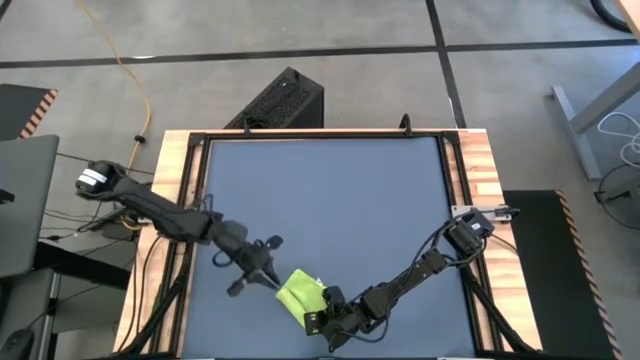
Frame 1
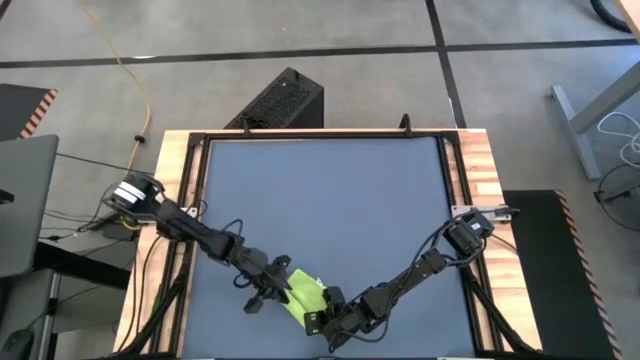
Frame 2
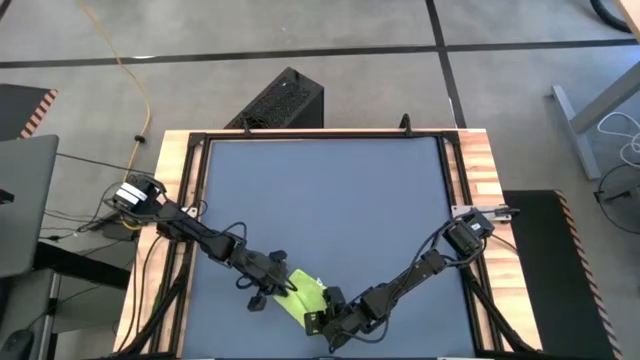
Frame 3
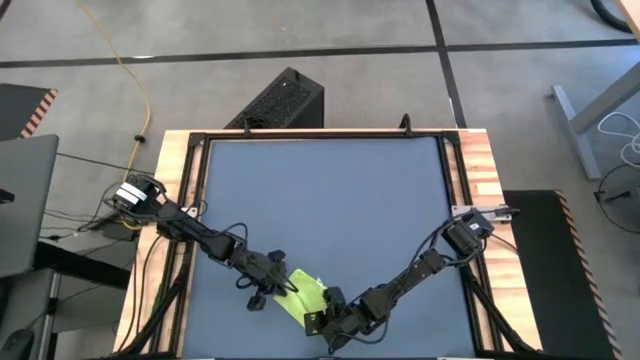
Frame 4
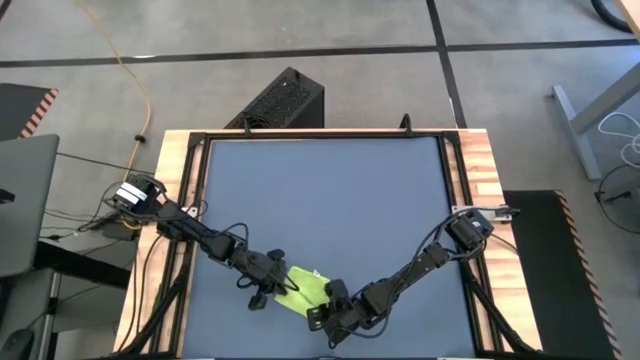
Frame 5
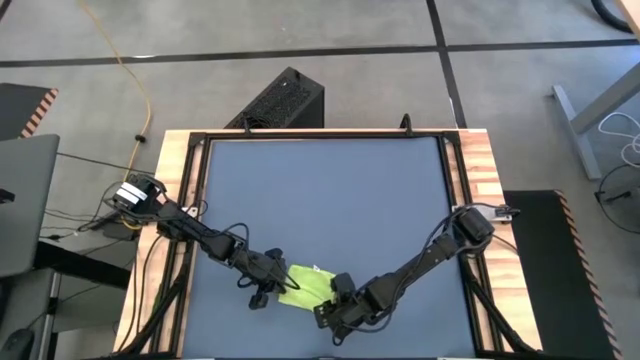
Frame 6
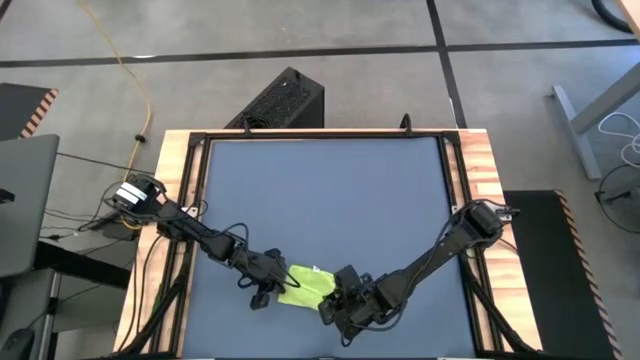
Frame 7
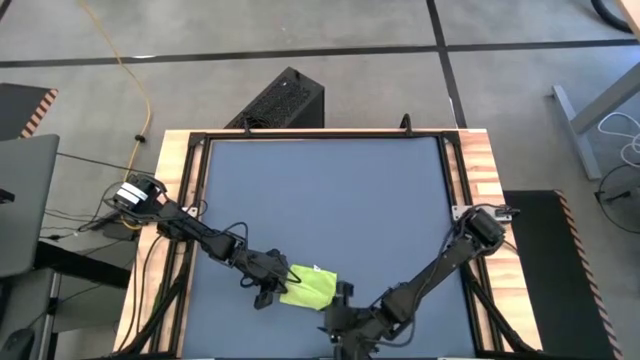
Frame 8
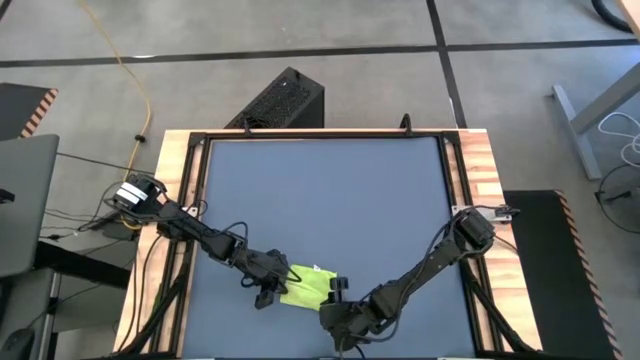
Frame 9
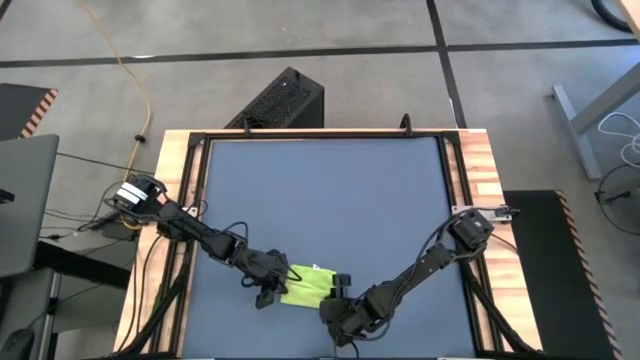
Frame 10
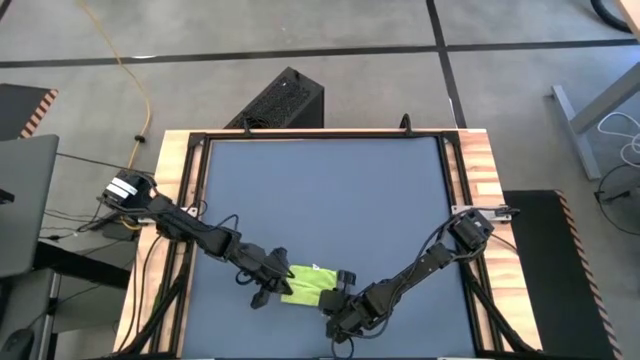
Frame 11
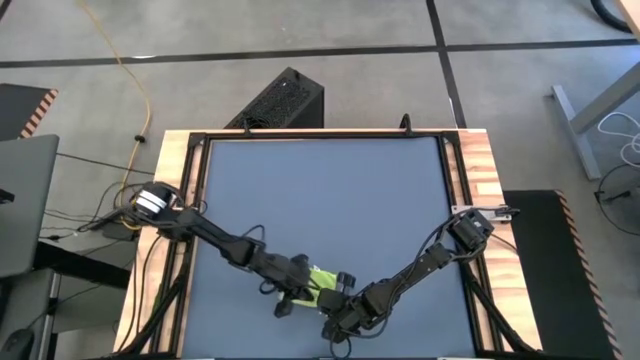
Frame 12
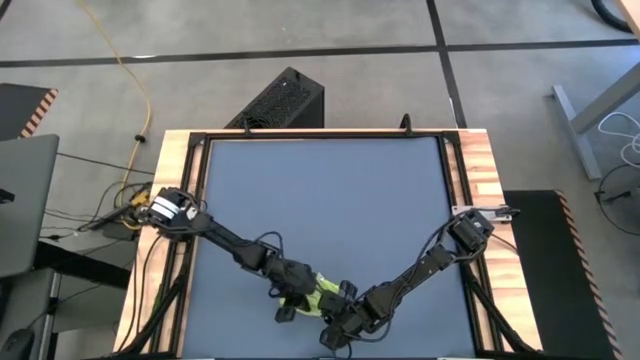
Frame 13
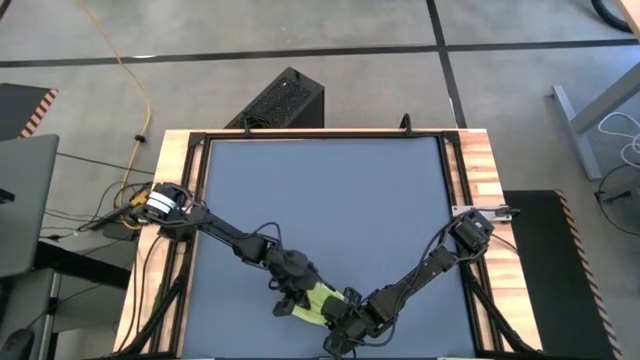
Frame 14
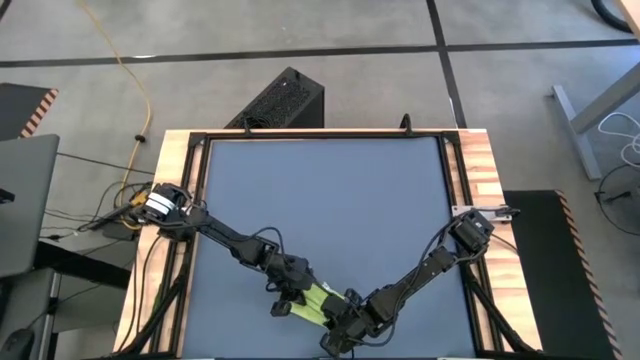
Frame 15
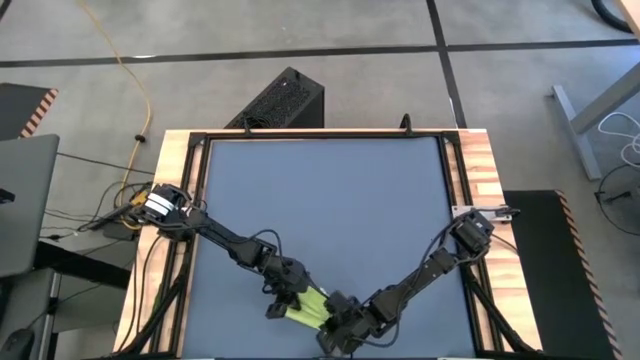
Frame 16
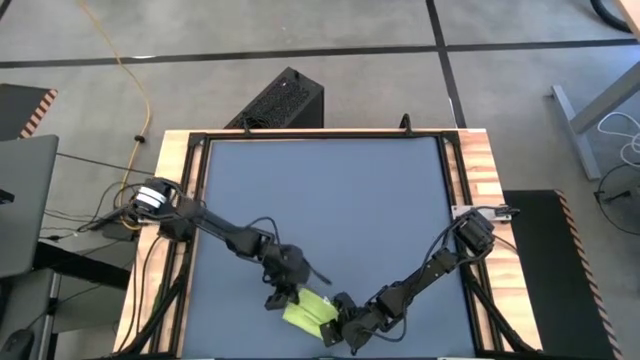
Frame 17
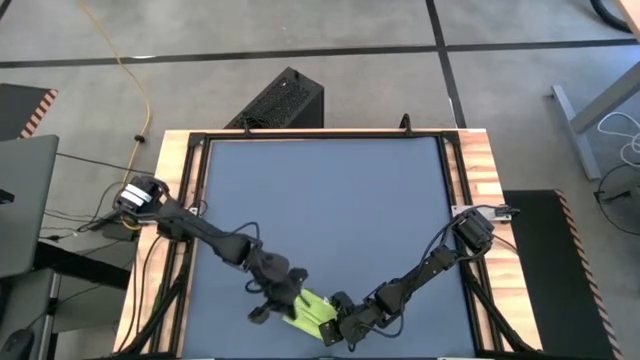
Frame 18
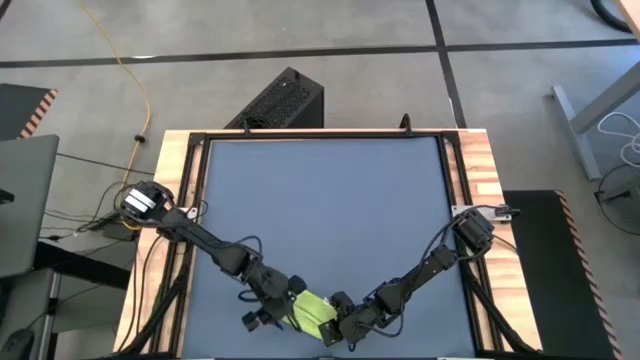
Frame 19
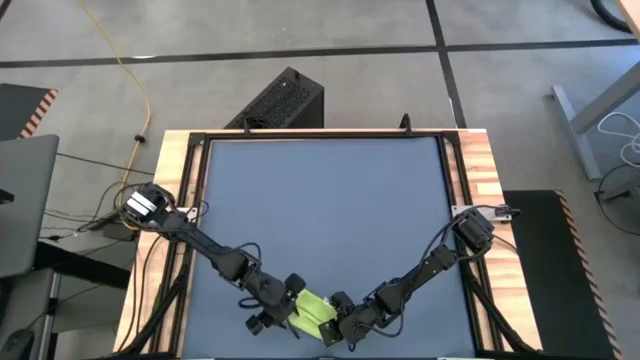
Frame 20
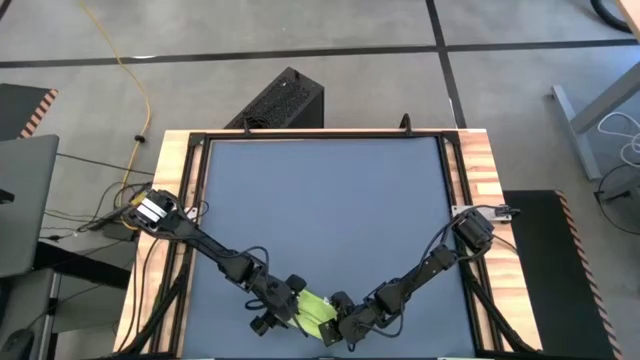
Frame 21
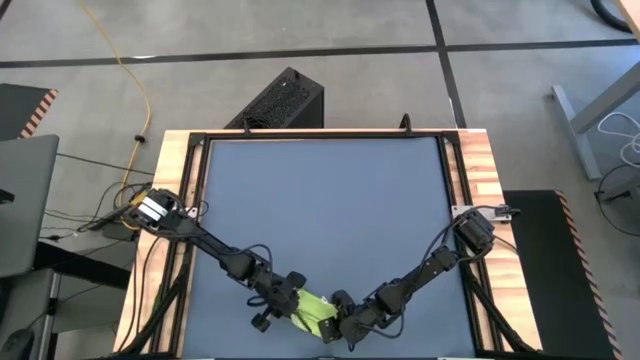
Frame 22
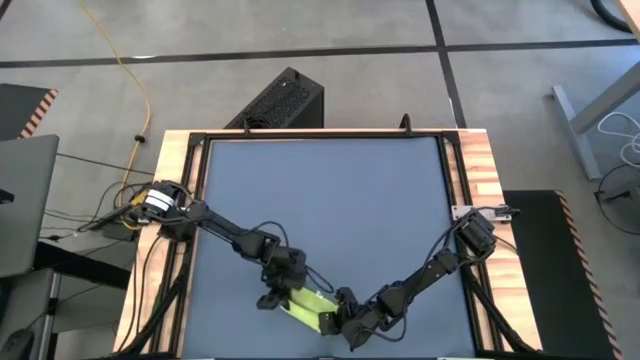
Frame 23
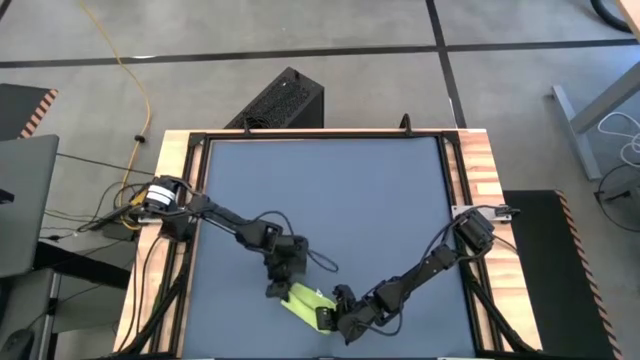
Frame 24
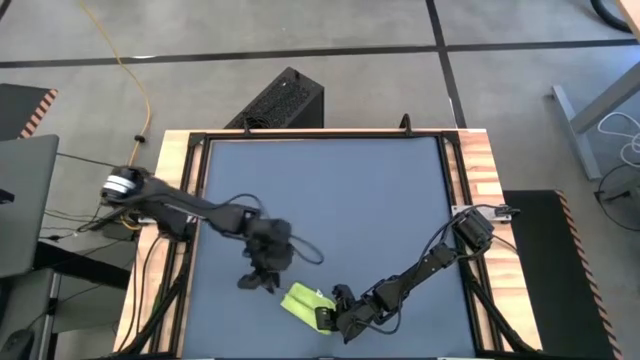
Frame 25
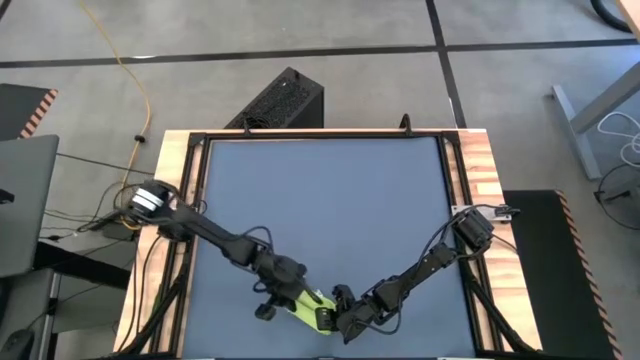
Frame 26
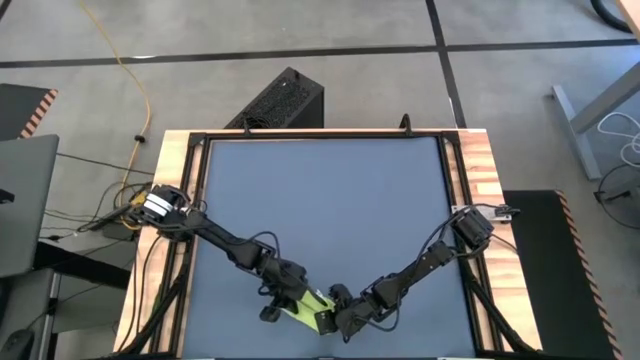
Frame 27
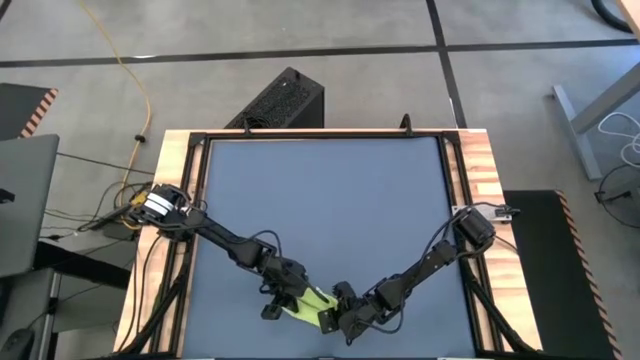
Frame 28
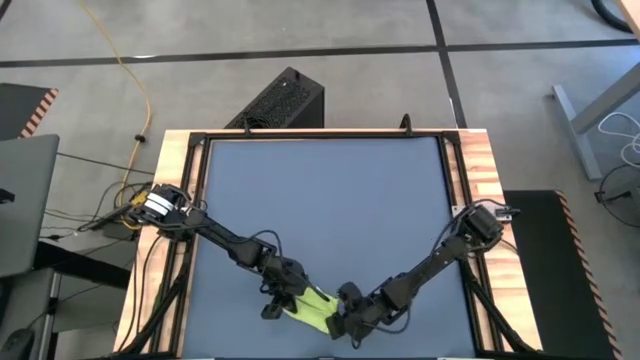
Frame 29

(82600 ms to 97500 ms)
Task: Roll towel
Roll the green towel

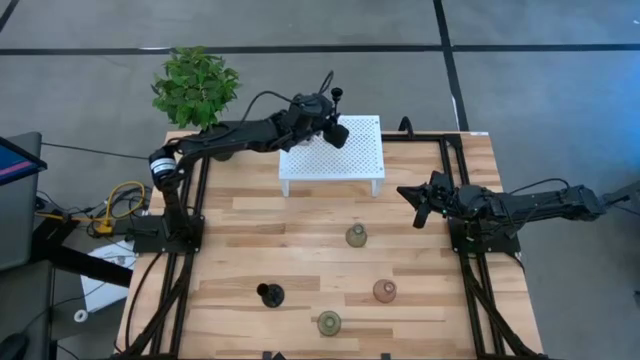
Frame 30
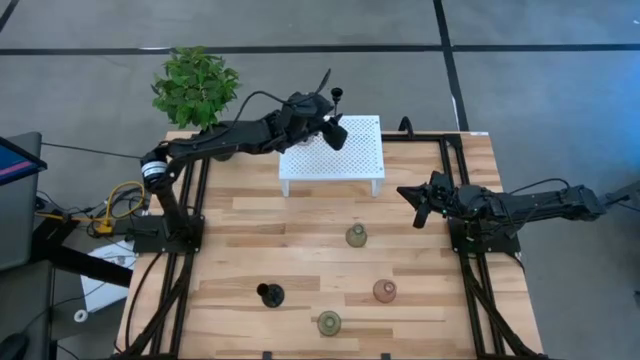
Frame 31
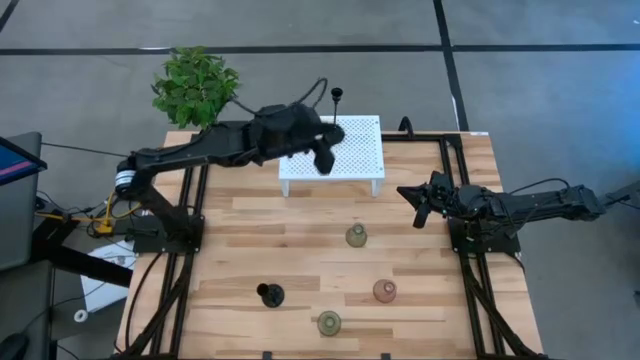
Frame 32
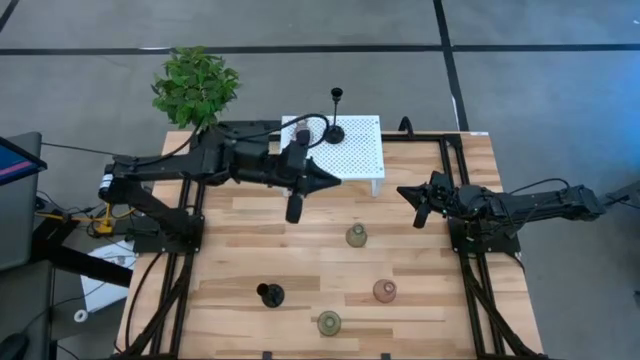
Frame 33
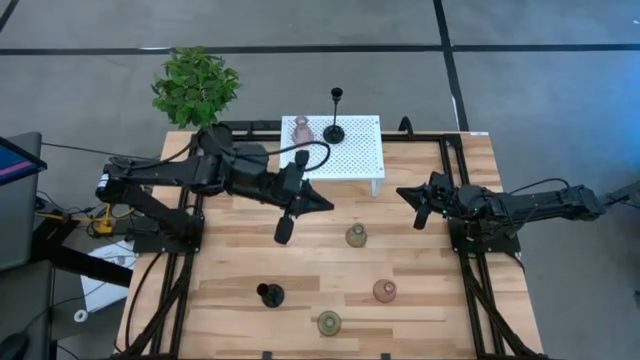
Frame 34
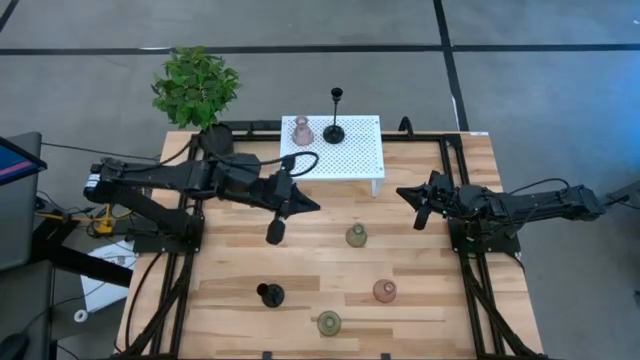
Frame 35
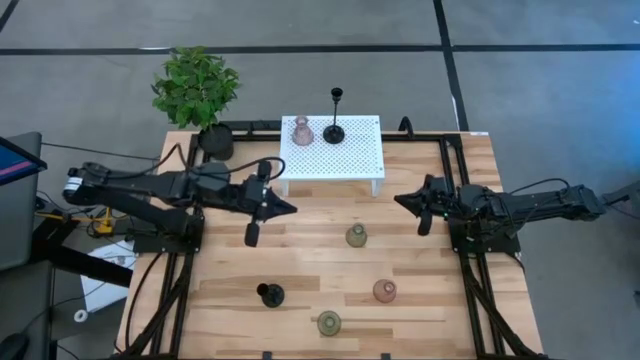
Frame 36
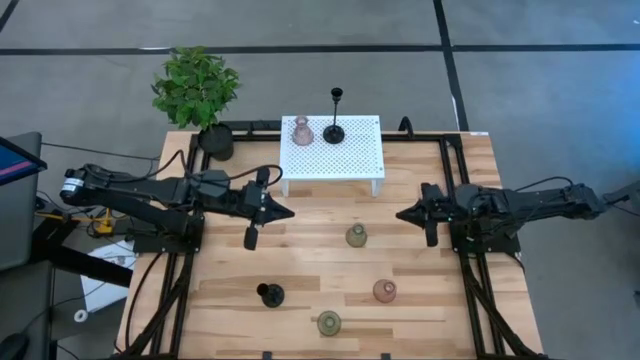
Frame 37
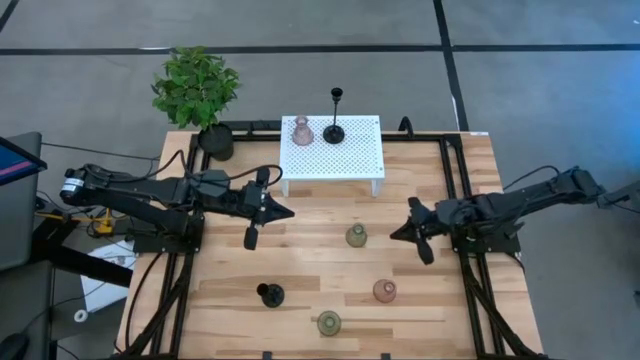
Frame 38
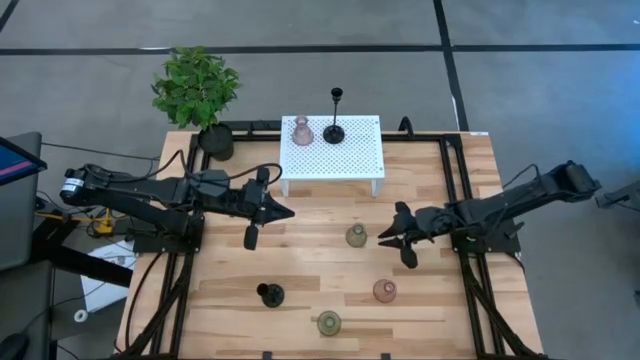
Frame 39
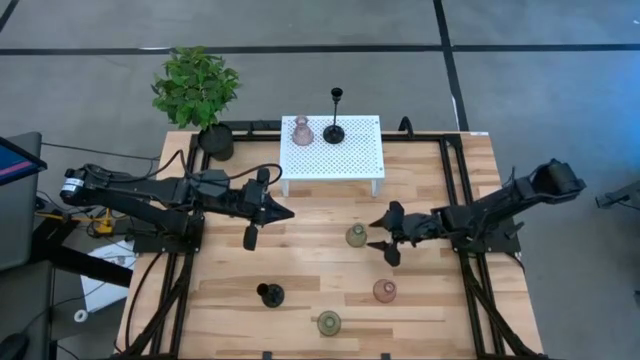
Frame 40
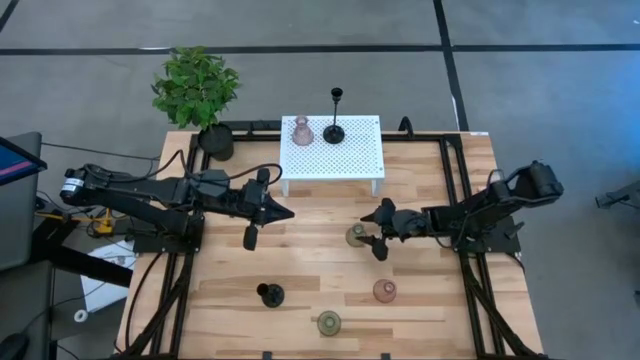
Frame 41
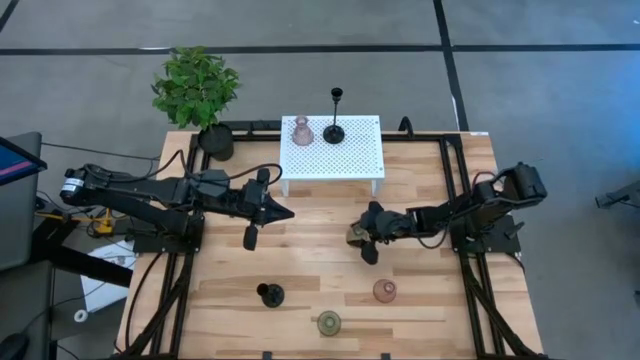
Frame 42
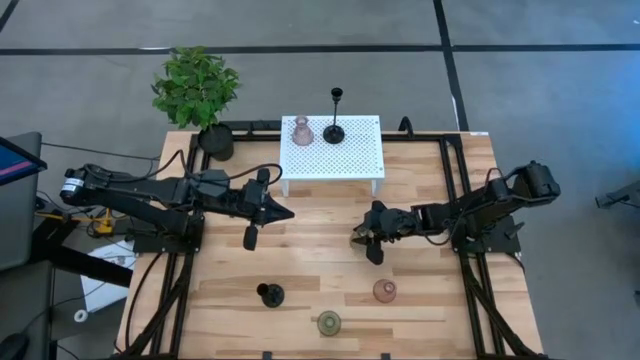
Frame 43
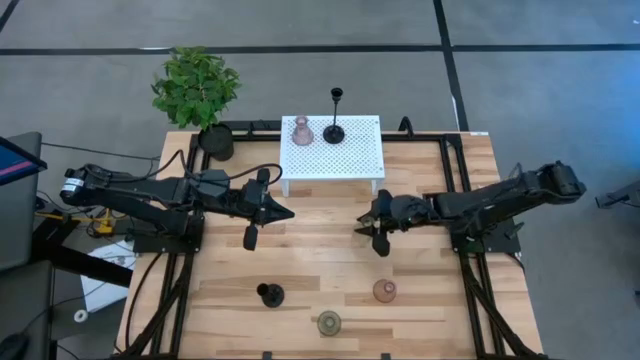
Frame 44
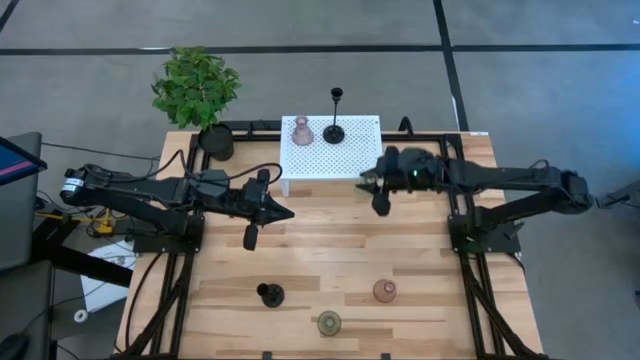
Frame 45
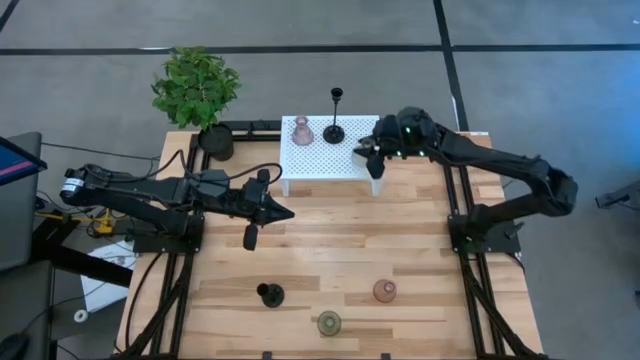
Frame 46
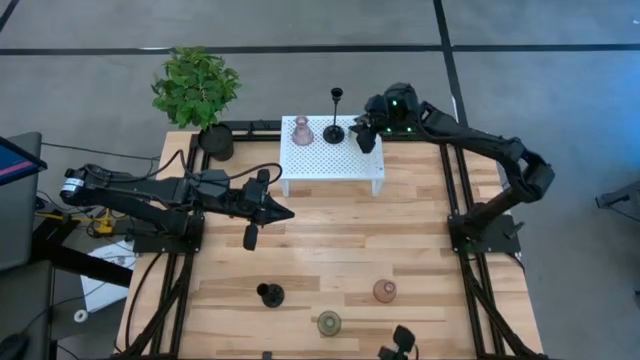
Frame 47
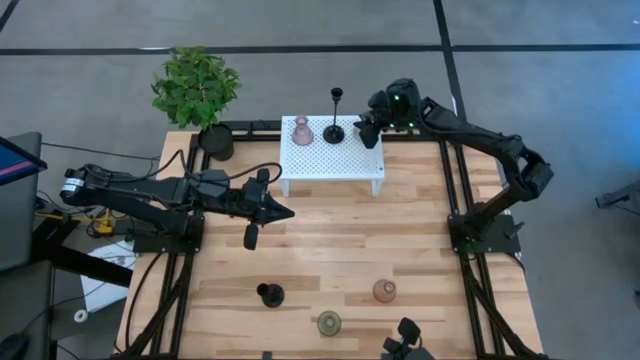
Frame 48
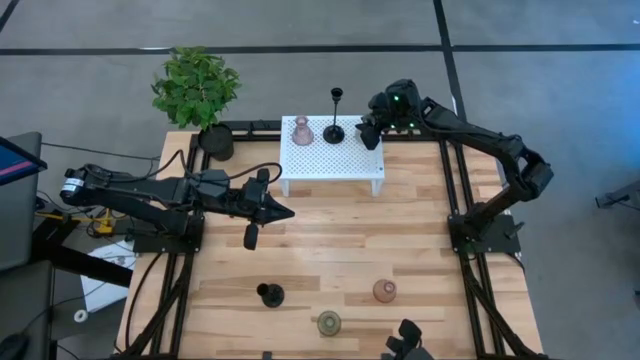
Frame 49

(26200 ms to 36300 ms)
Task: Pick & Place candle stick holders
Put the top green candle holder on the shelf
